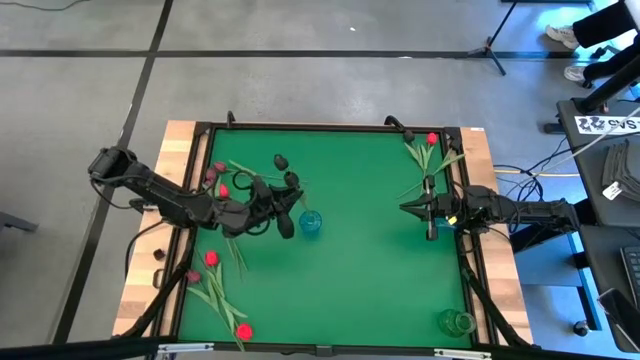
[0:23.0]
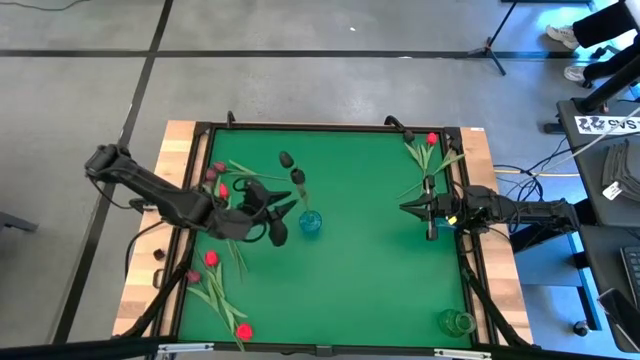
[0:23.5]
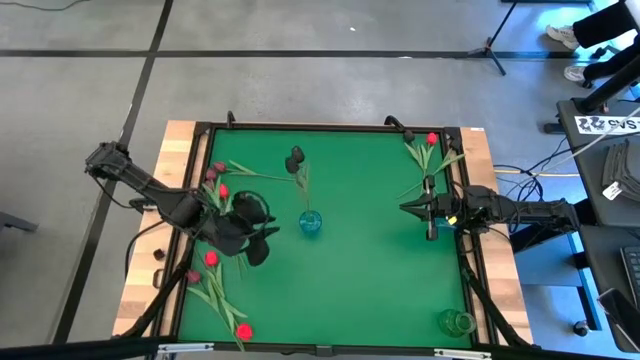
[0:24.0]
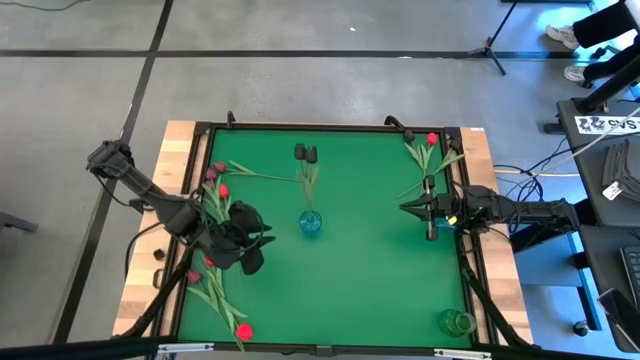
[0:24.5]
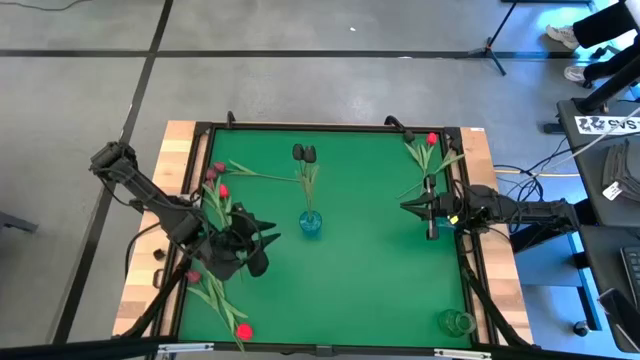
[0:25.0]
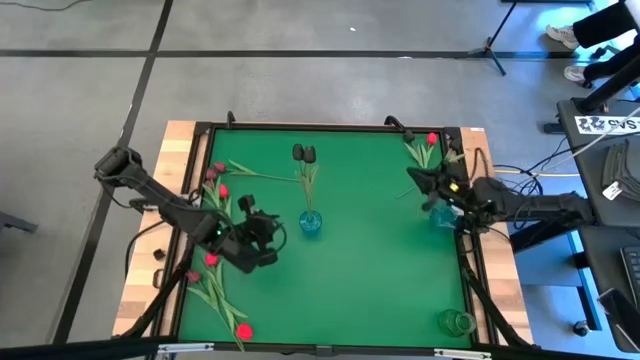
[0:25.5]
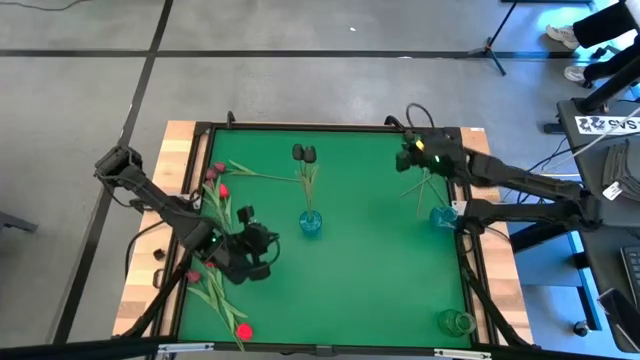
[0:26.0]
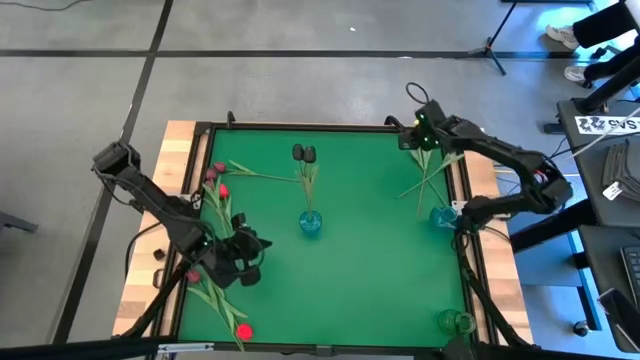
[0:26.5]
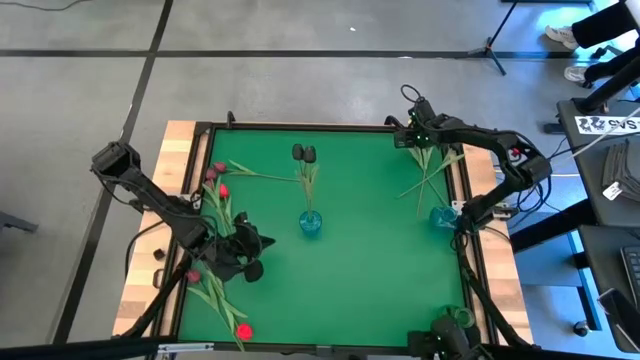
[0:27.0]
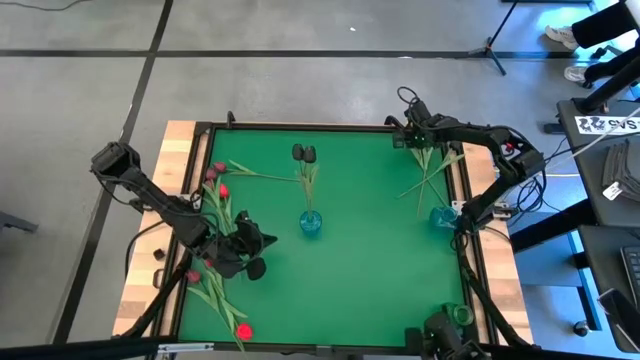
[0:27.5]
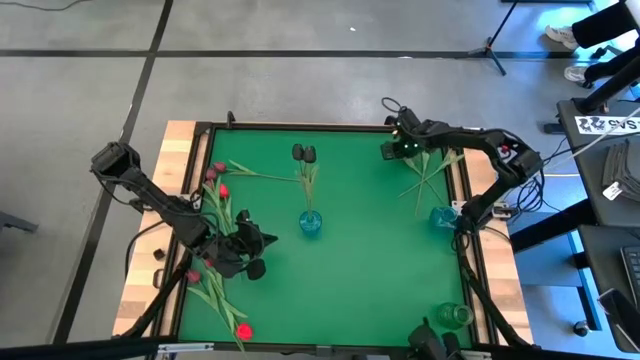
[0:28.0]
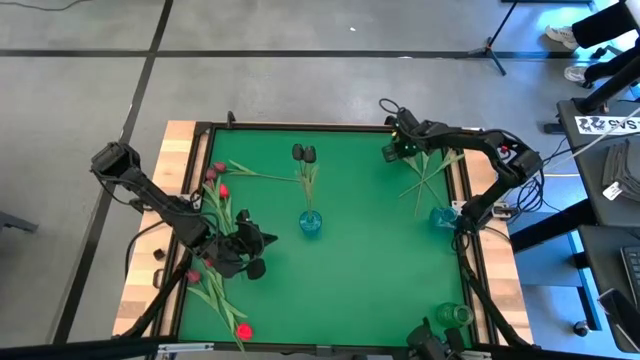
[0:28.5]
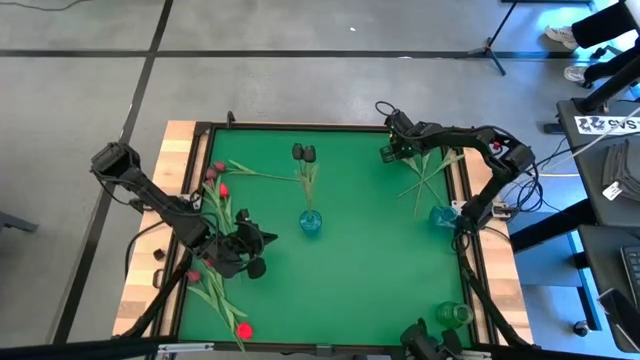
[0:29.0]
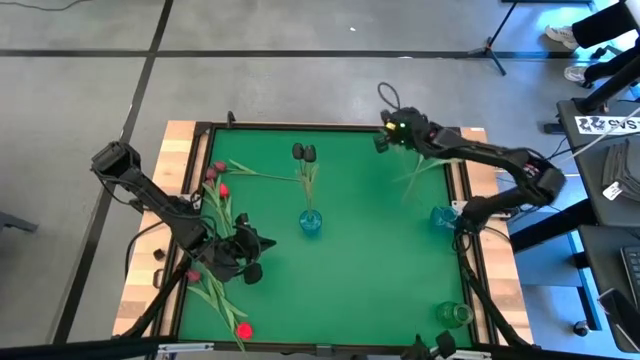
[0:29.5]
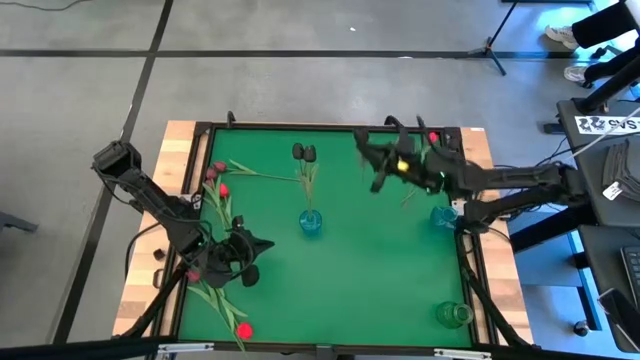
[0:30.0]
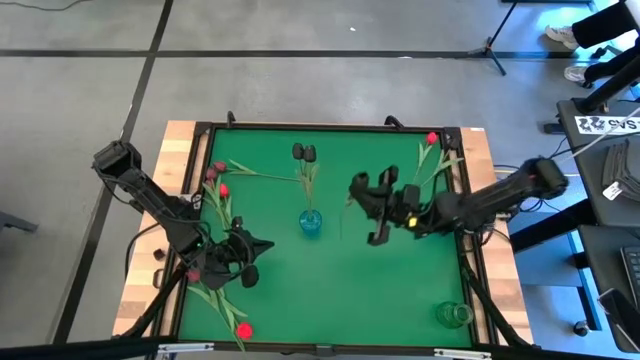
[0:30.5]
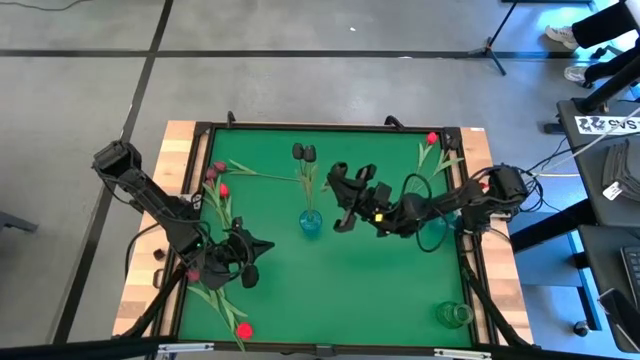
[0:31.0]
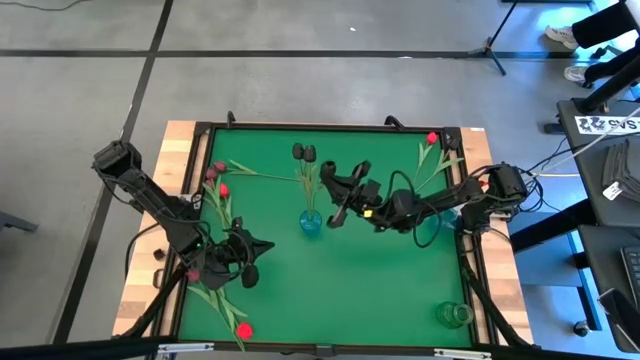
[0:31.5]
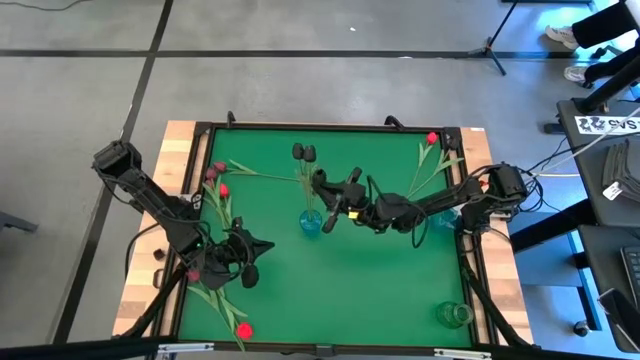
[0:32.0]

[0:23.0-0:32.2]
Task: Sort flowers into vase by color
Put the black flower into the left blue vase

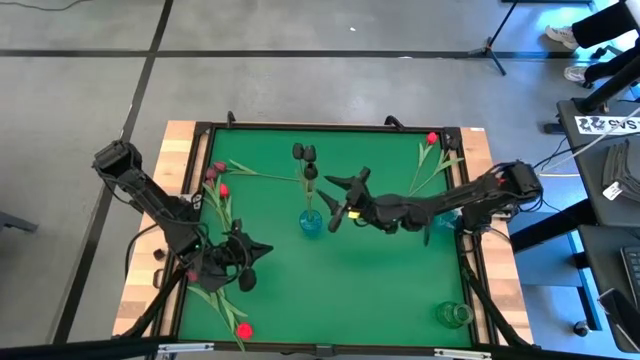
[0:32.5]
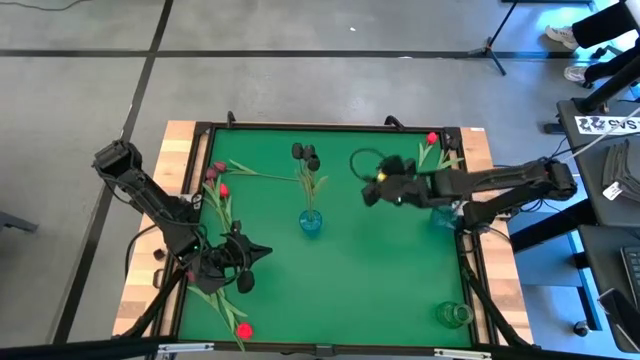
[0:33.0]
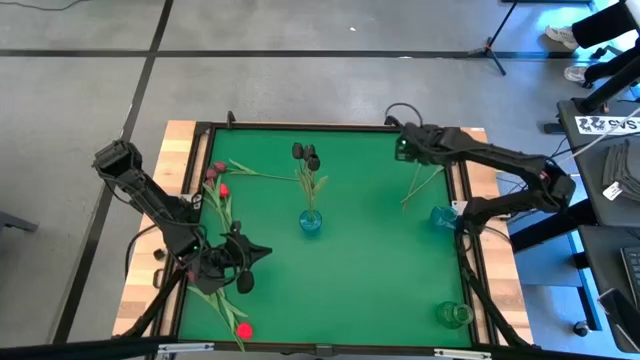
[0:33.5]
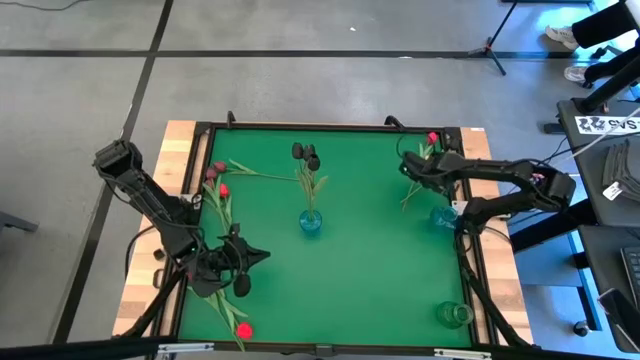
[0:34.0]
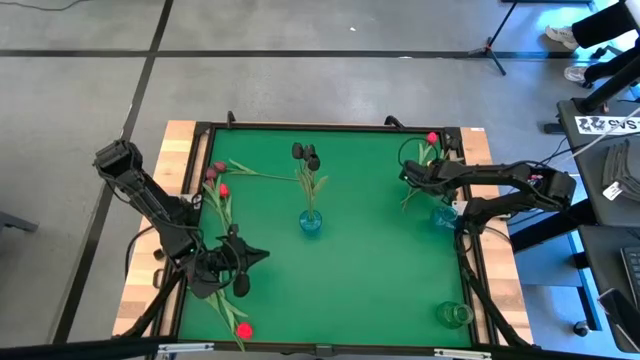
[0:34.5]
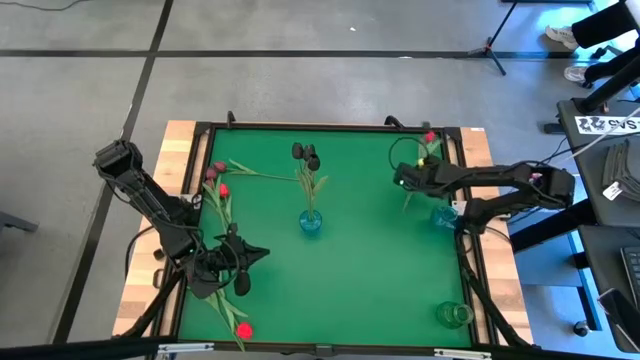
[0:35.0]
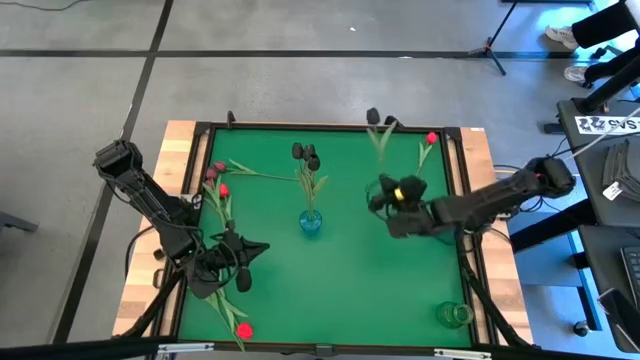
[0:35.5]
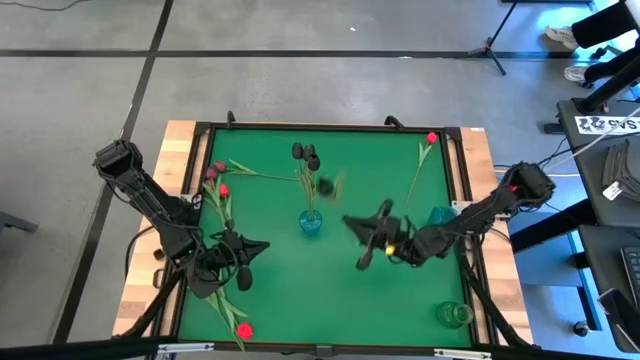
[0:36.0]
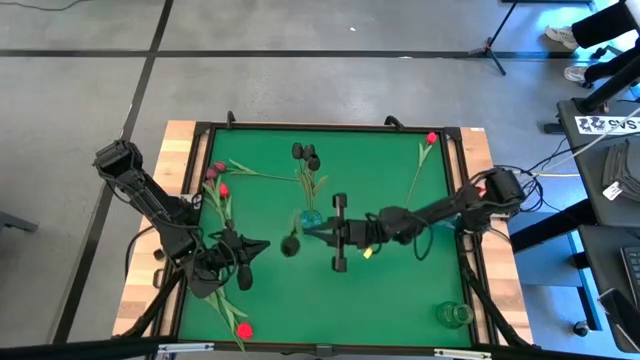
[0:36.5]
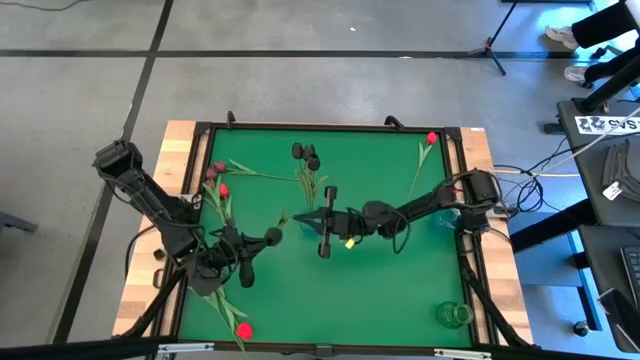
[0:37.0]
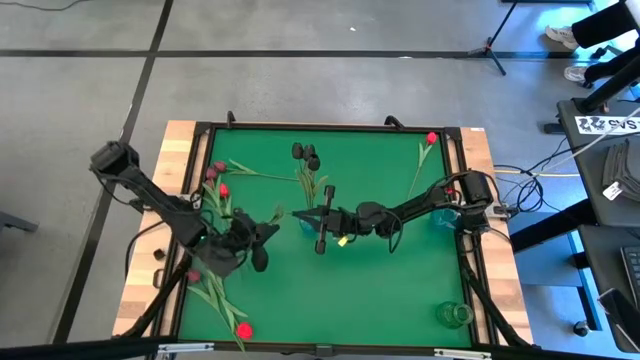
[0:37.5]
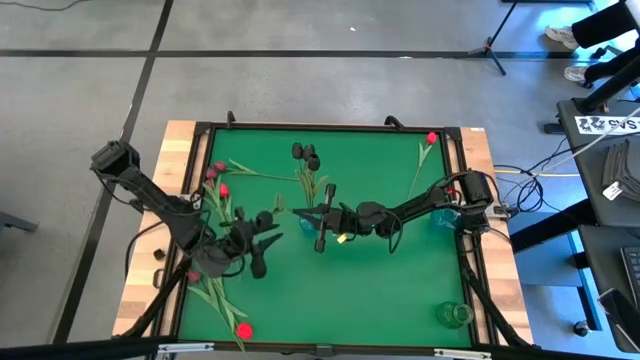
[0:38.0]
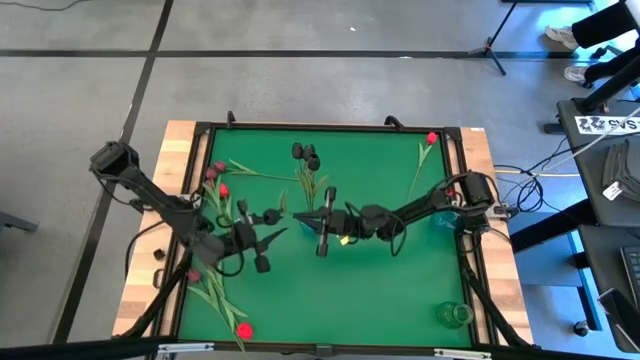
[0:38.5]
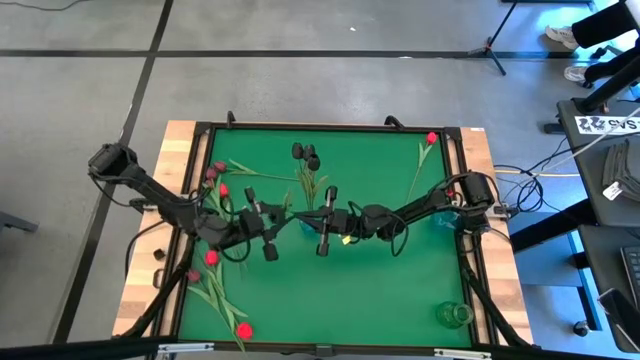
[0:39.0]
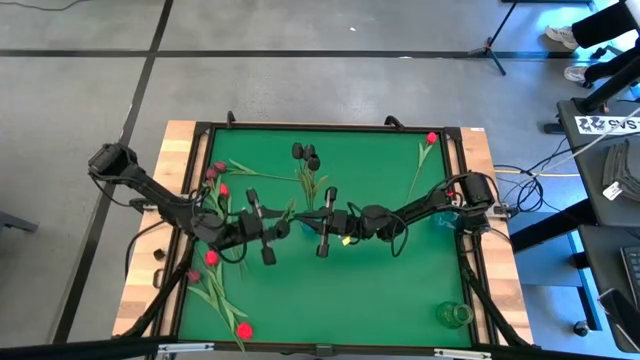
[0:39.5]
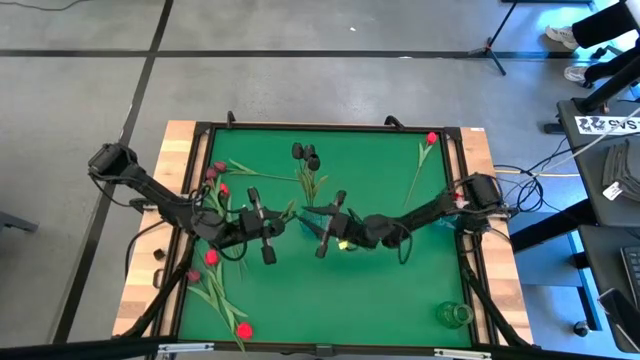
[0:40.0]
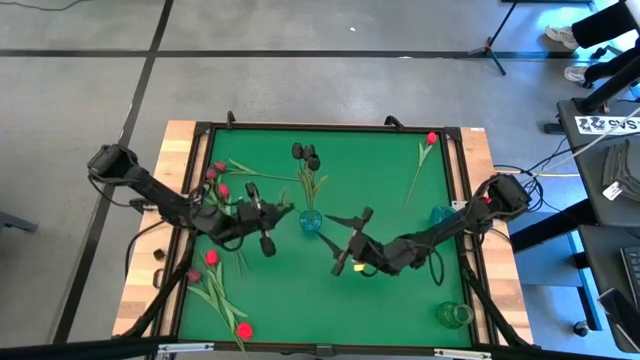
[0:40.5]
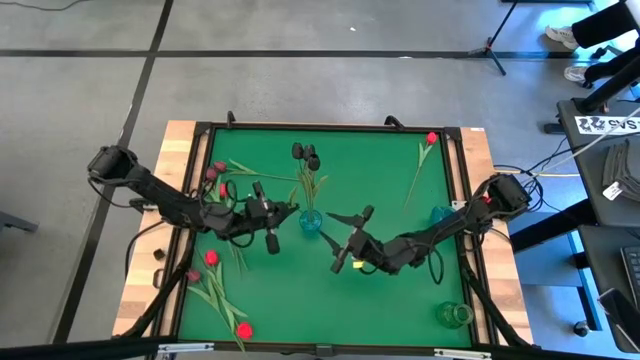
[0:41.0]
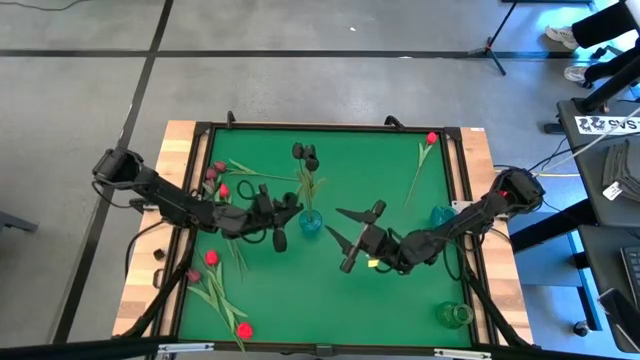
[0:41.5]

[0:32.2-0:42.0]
Put the black flower into the left blue vase

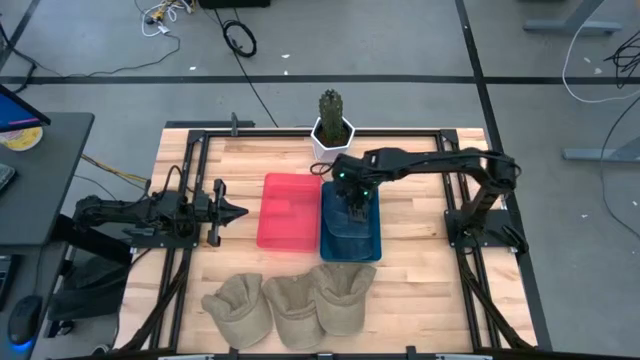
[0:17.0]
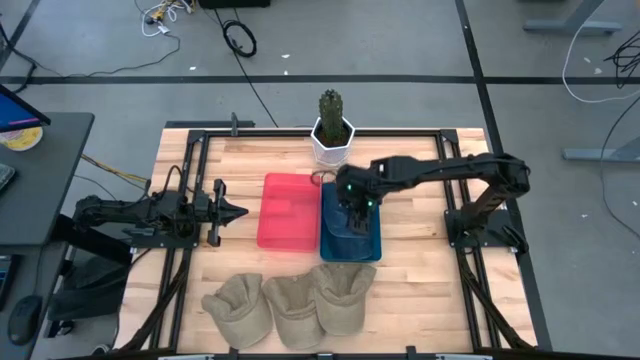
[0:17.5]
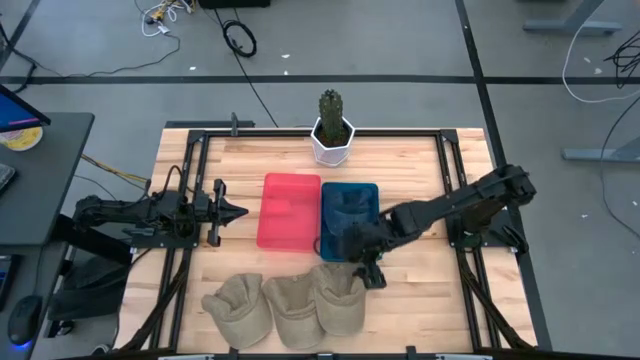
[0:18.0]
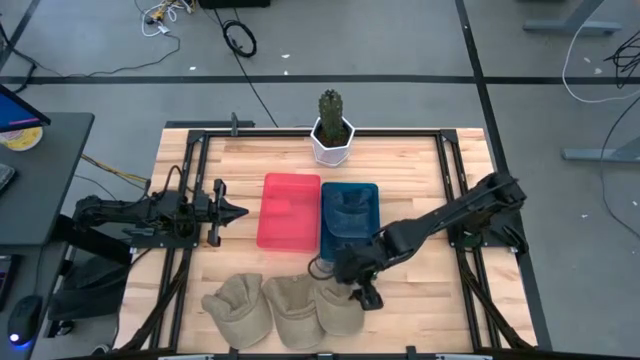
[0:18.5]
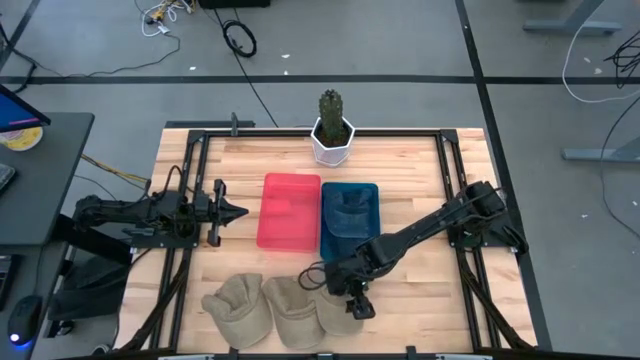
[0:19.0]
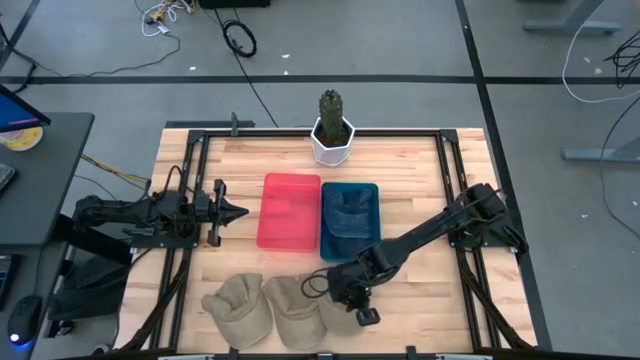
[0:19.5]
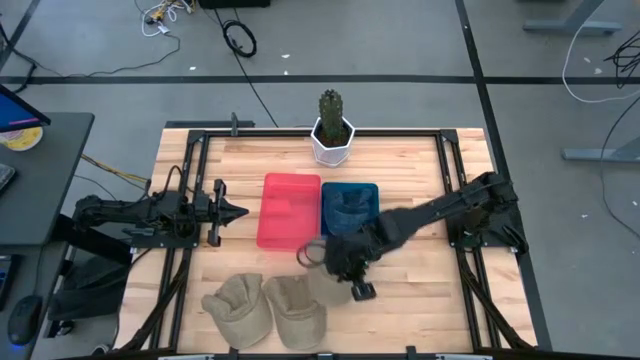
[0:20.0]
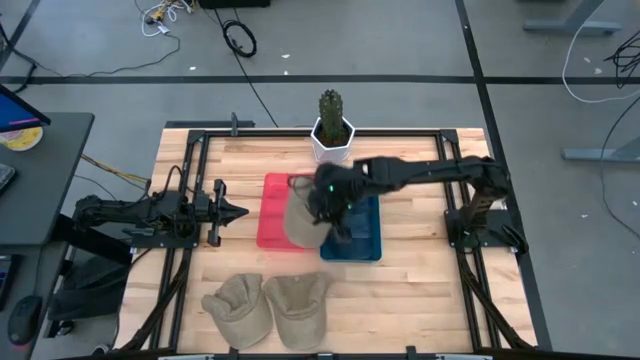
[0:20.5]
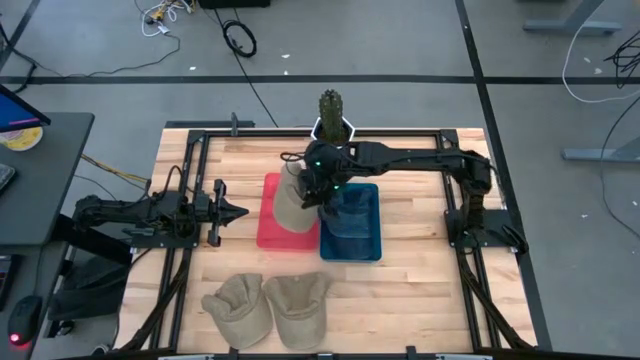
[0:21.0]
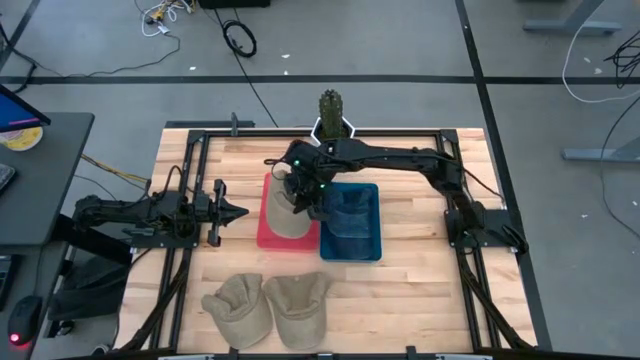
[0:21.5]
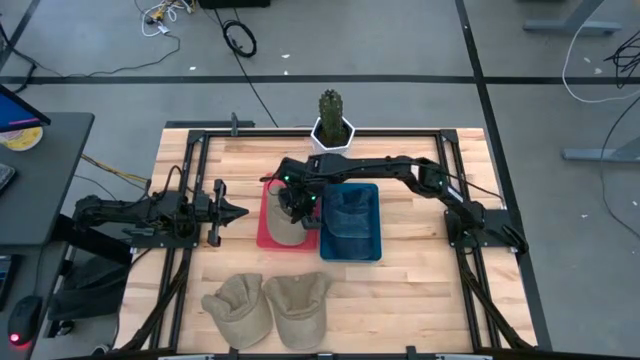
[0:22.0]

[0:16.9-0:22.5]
Task: Pick & Place hat
Put the right brown cap into the pink bin
